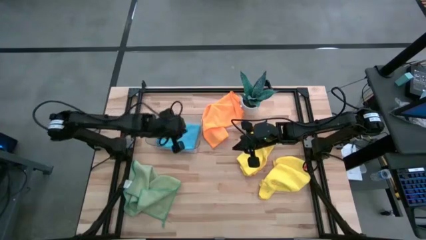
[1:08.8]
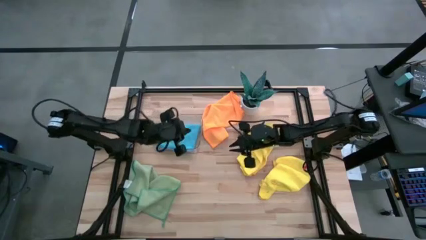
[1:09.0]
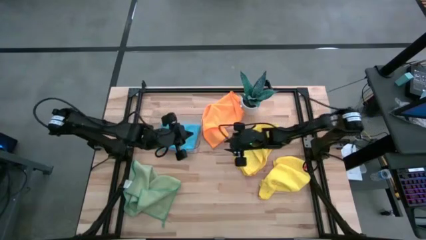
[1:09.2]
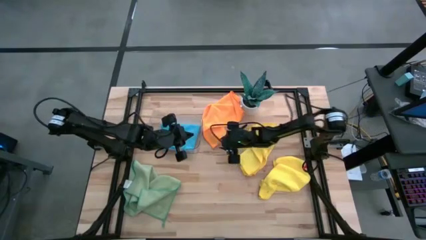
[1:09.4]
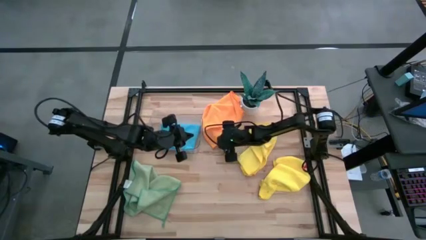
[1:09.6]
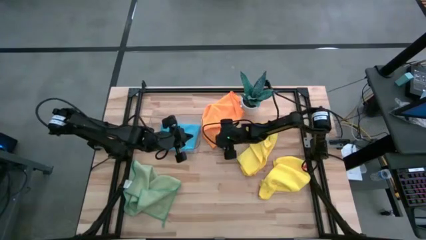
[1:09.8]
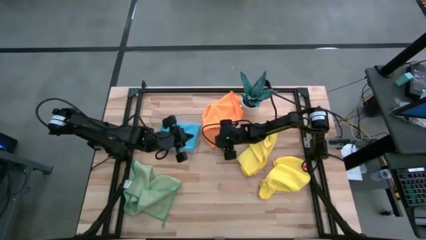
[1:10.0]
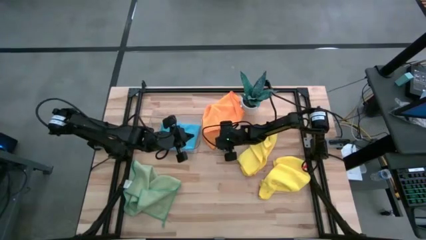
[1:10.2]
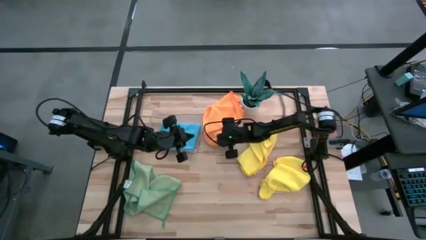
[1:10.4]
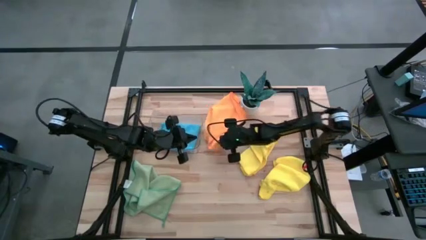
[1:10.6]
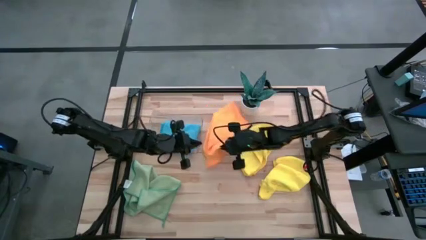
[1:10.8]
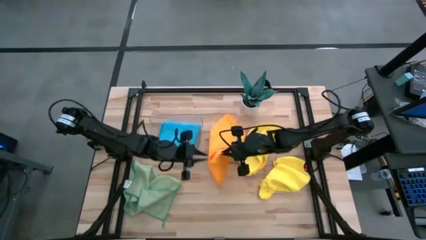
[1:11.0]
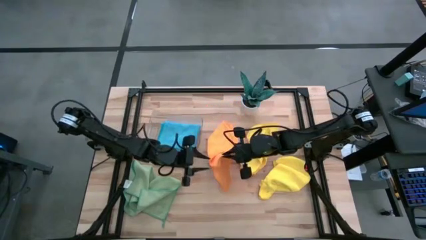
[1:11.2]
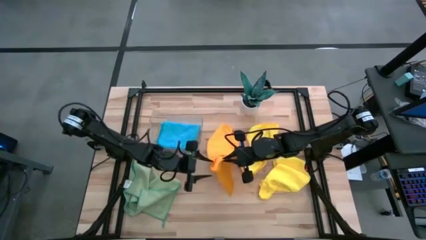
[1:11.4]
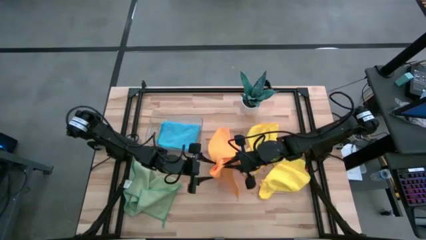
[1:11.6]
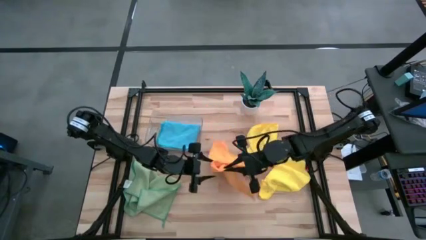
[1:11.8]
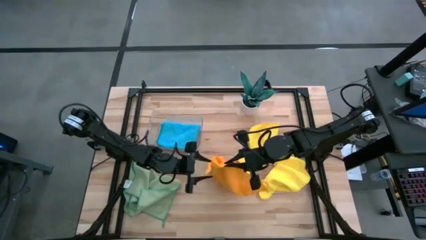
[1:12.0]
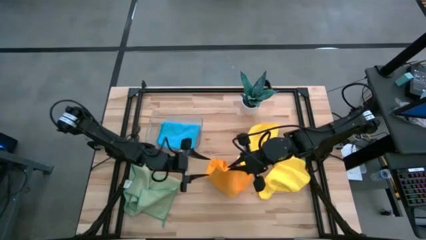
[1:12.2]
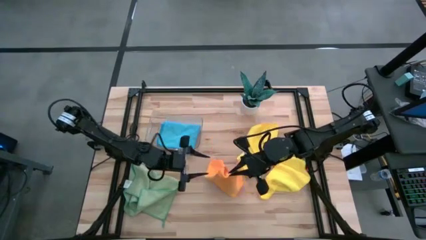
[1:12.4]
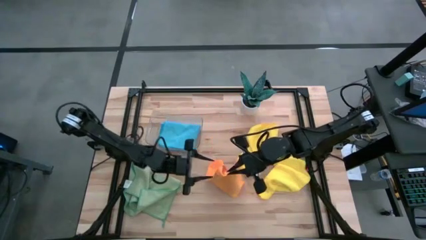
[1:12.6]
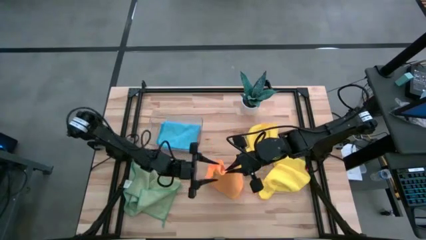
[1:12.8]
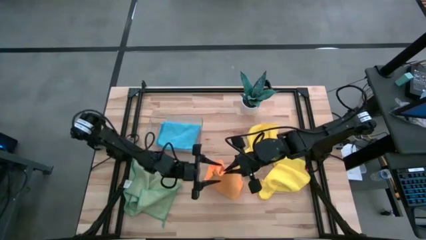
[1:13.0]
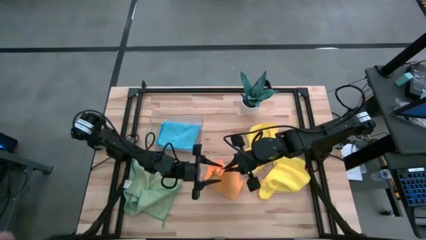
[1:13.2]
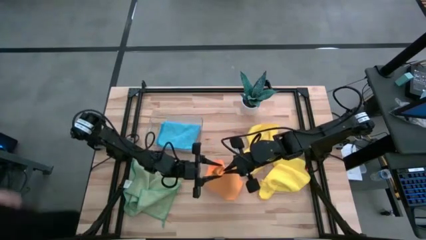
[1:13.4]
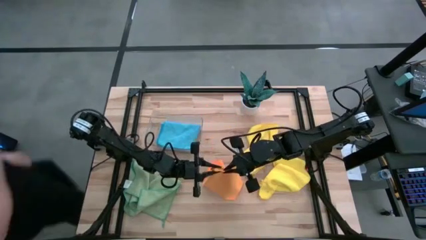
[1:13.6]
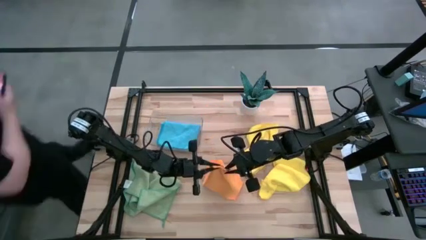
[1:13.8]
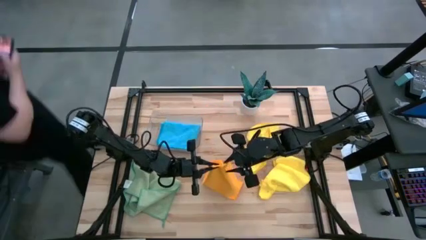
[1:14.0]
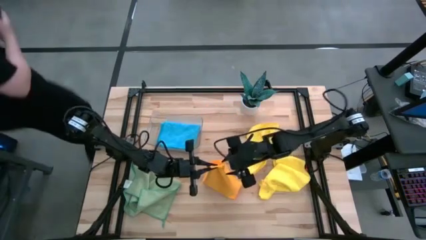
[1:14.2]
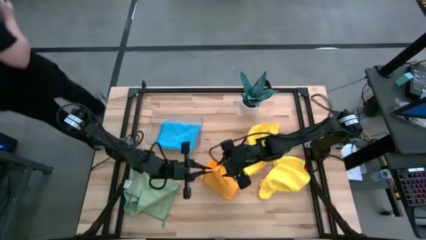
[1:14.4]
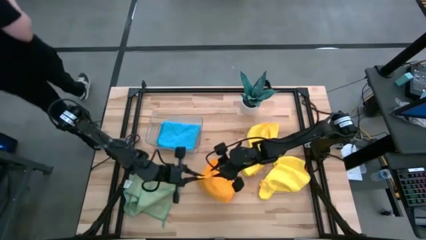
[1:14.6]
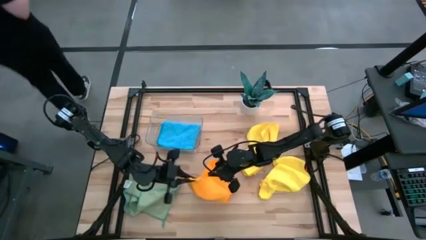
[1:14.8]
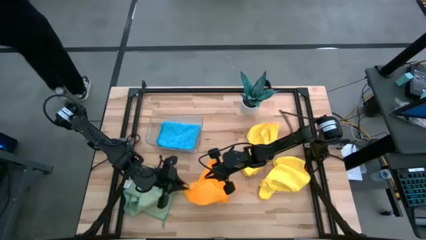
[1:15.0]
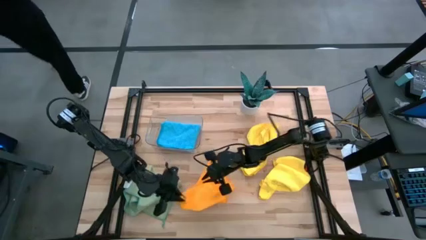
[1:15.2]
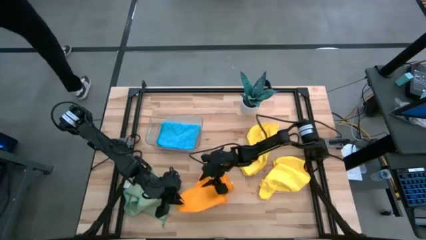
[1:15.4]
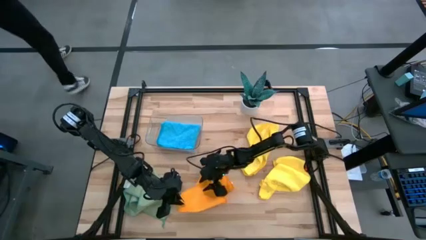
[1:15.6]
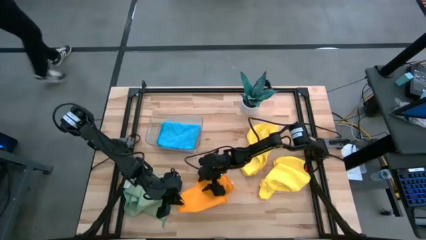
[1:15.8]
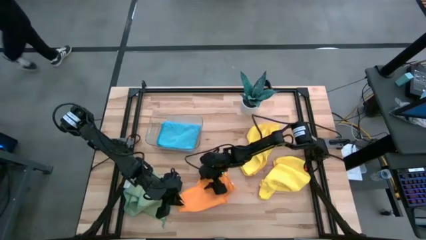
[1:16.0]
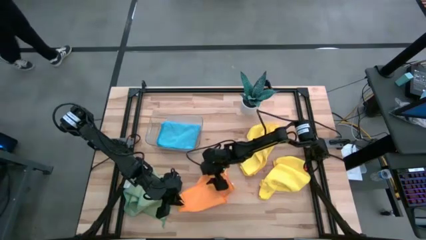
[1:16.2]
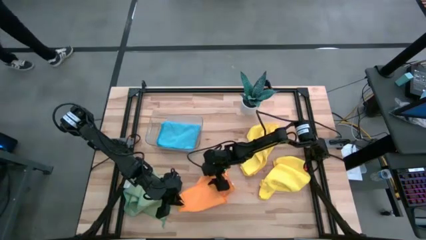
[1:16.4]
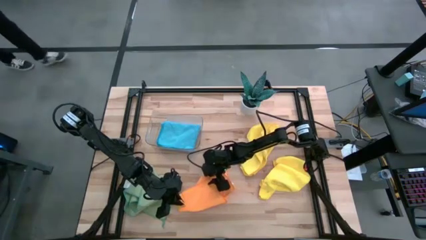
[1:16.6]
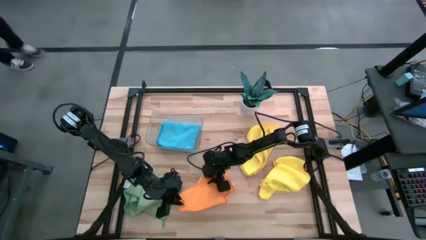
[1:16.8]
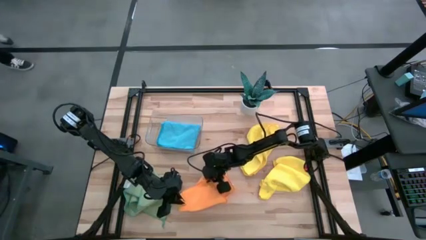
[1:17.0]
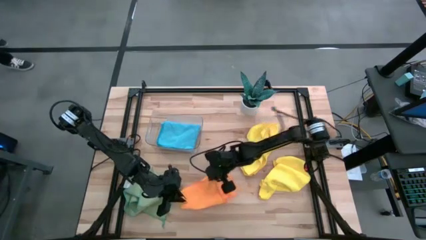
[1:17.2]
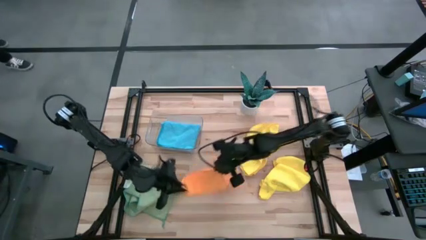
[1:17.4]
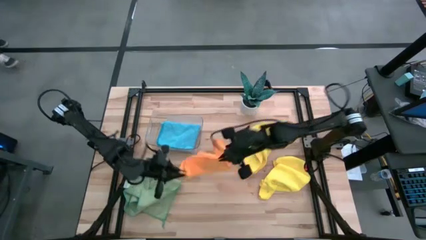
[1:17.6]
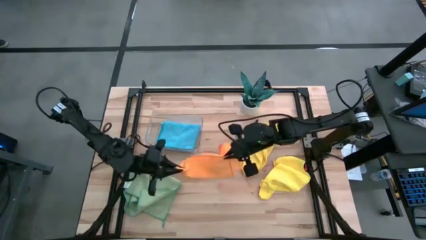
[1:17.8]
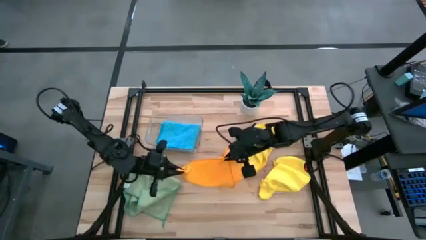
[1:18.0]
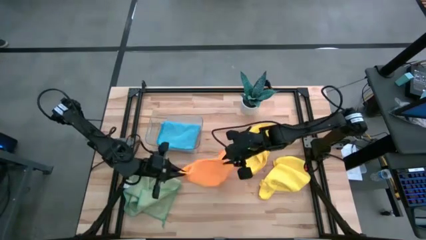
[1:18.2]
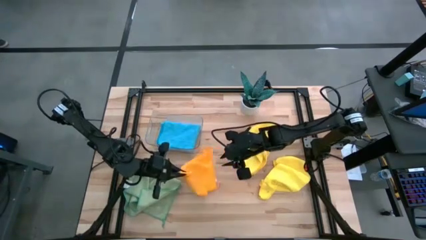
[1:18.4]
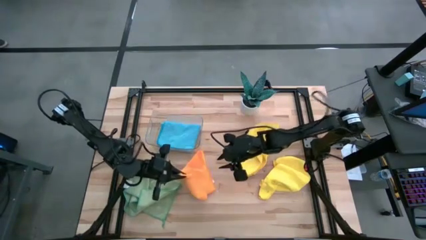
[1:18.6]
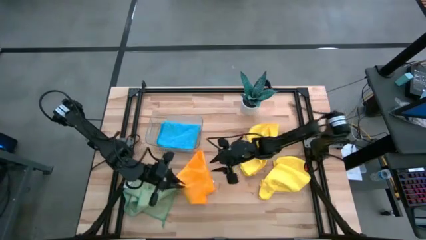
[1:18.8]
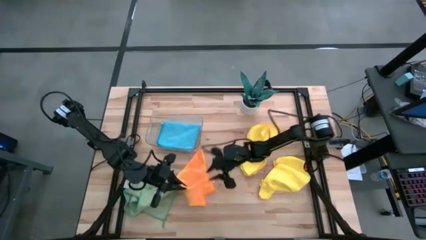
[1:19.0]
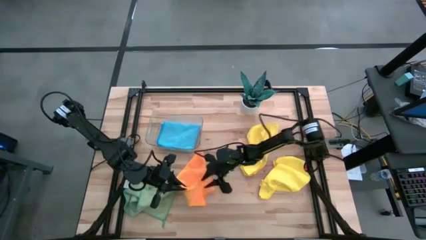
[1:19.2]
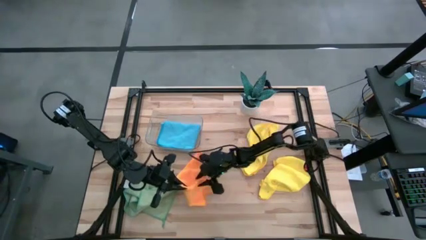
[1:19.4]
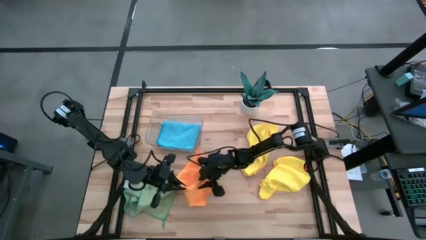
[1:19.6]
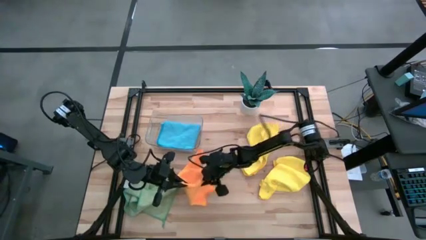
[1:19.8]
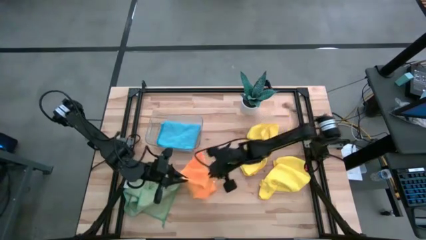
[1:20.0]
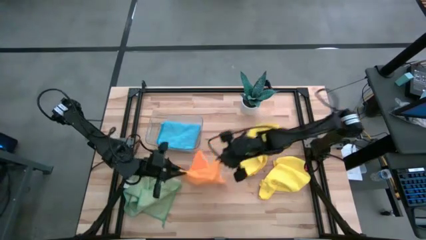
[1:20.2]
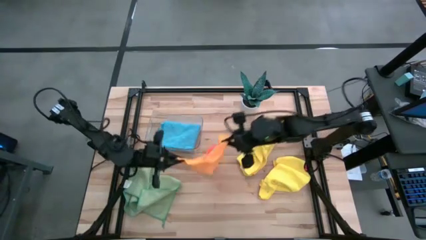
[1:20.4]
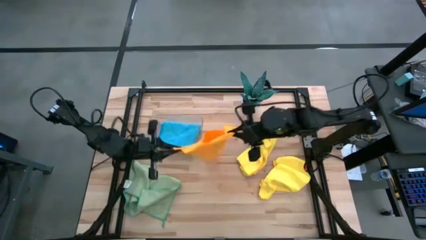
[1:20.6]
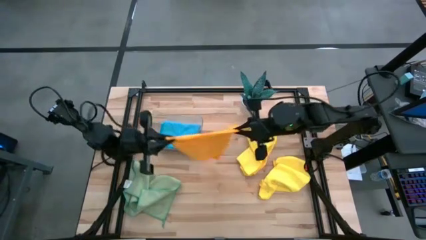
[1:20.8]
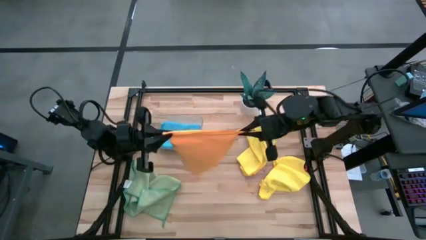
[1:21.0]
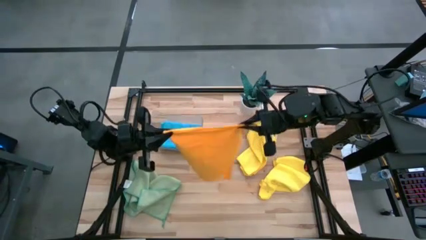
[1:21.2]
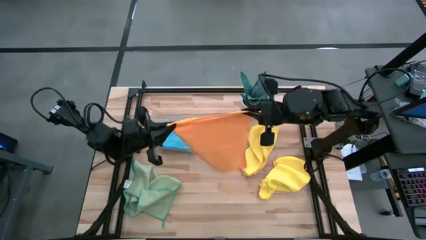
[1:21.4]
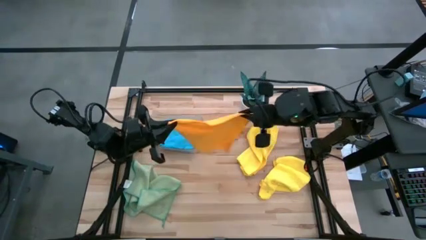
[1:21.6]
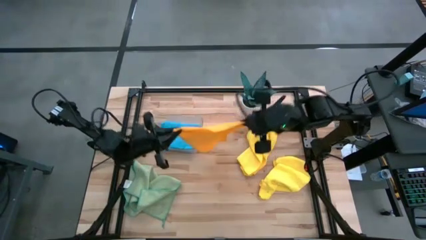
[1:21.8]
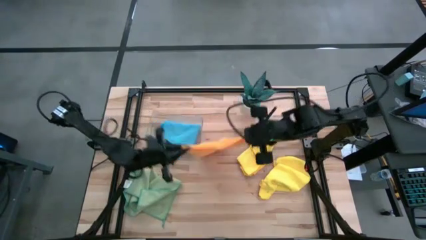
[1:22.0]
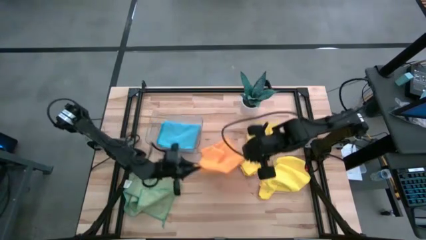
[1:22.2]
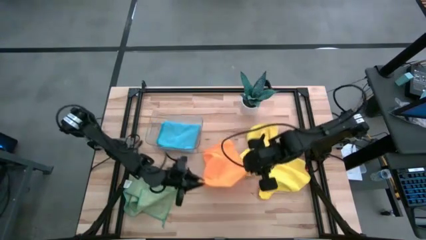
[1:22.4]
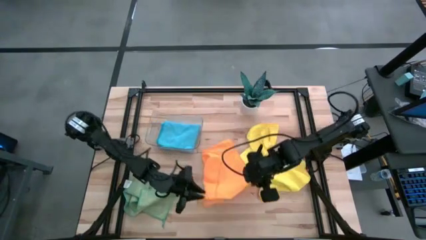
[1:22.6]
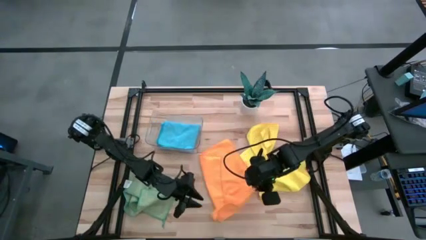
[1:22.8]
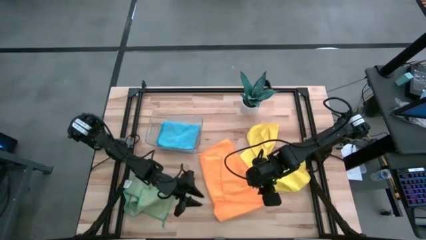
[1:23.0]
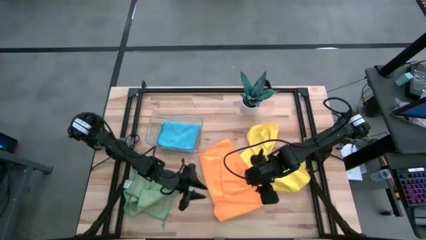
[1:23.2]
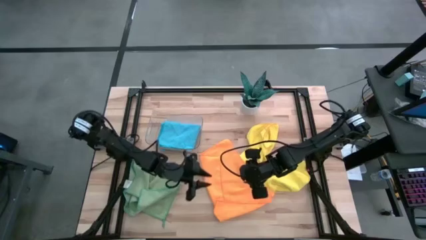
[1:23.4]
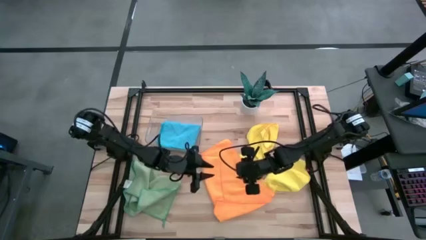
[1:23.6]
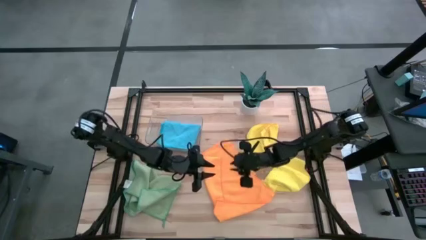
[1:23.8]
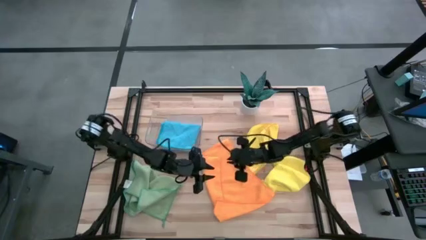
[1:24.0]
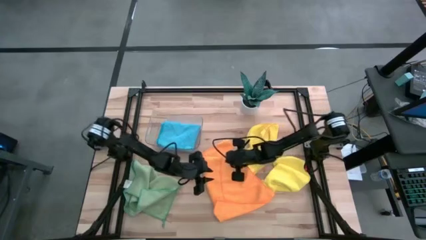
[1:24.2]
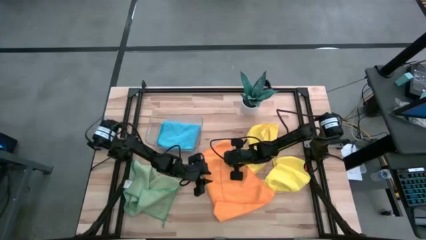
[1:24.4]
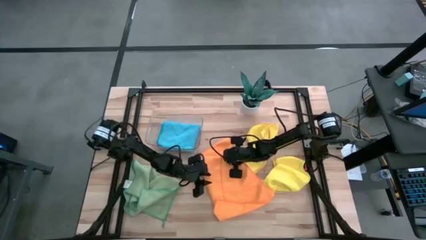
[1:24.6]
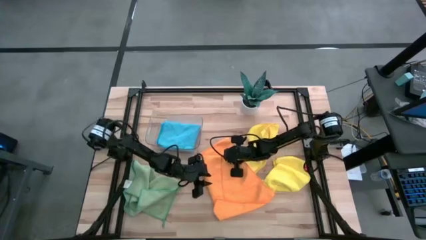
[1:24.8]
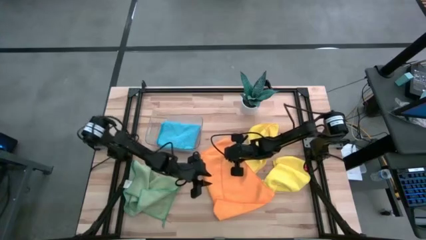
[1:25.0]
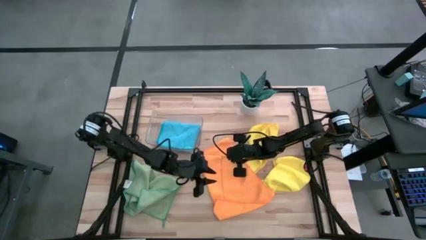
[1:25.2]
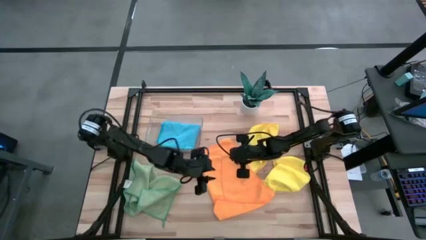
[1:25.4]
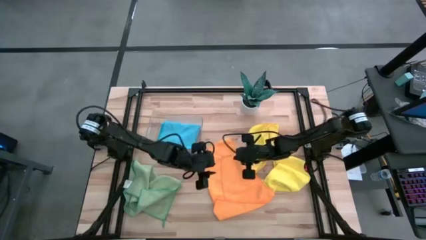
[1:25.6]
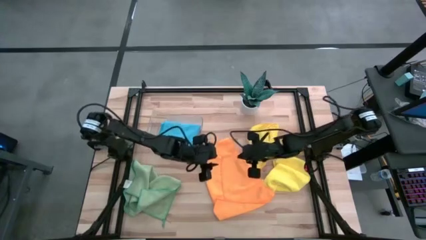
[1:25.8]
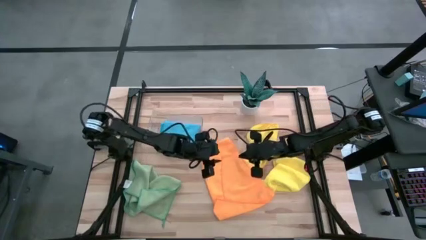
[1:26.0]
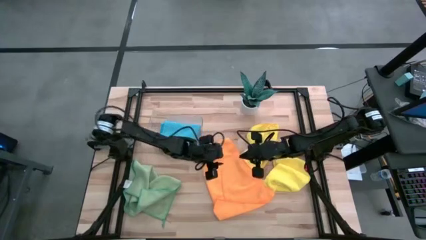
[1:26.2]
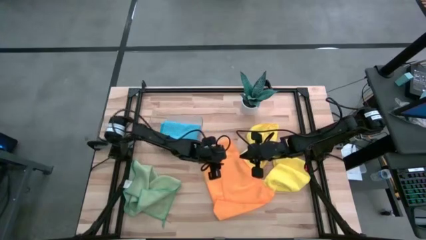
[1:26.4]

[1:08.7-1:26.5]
Task: Fold microfiber towels
Fold the orange microfiber cloth
